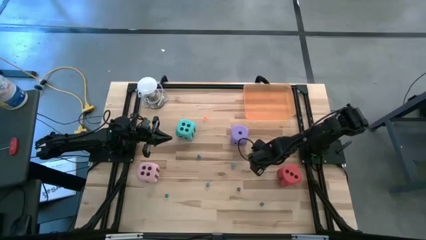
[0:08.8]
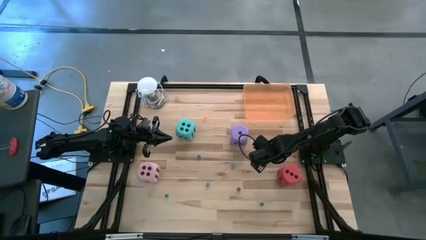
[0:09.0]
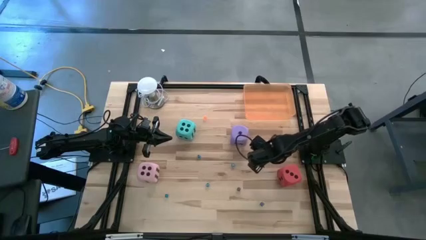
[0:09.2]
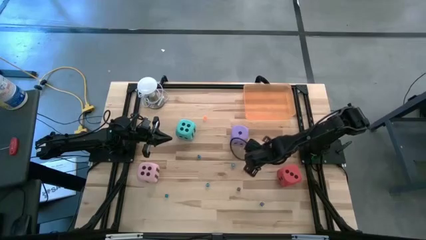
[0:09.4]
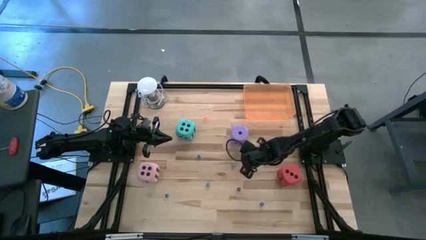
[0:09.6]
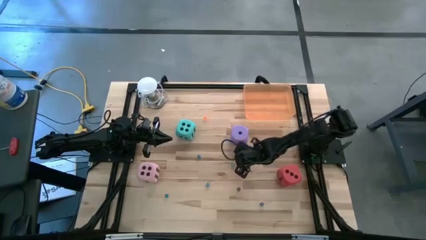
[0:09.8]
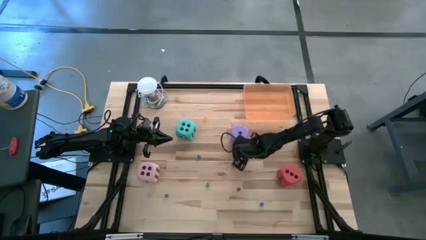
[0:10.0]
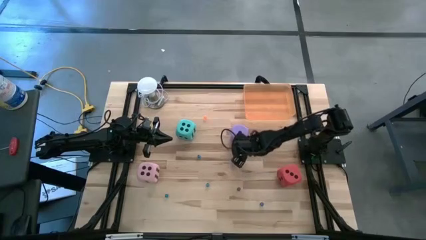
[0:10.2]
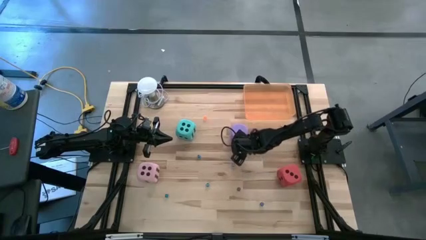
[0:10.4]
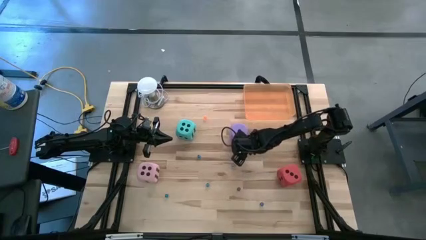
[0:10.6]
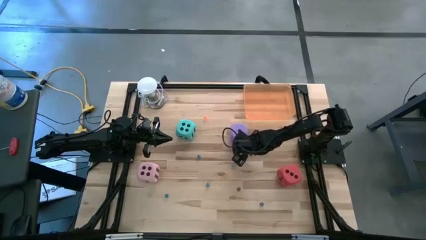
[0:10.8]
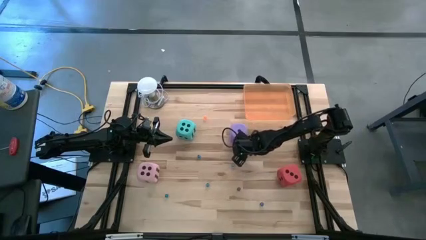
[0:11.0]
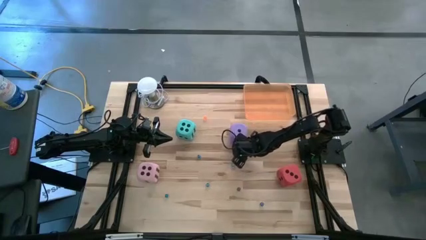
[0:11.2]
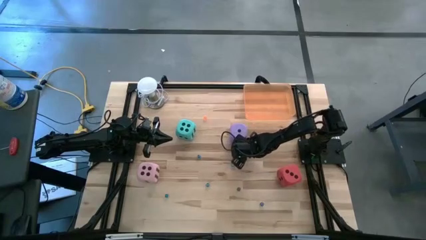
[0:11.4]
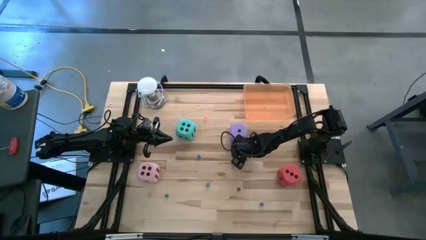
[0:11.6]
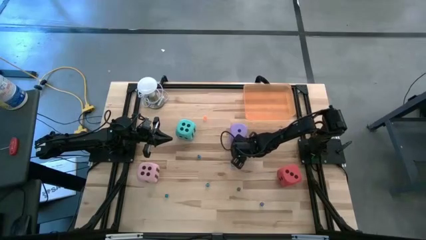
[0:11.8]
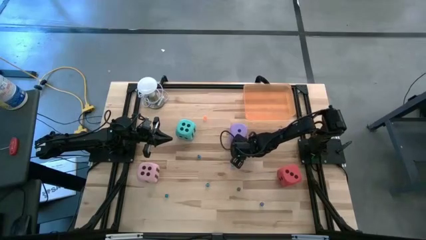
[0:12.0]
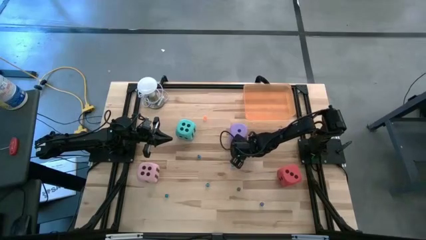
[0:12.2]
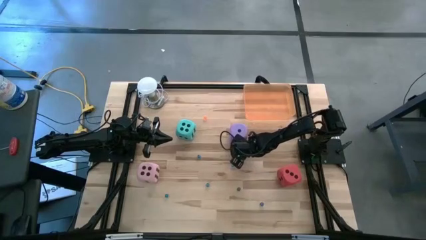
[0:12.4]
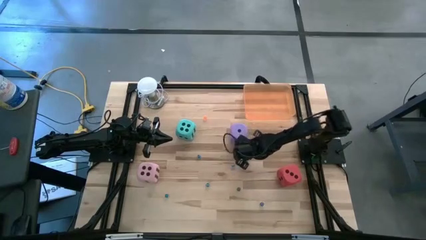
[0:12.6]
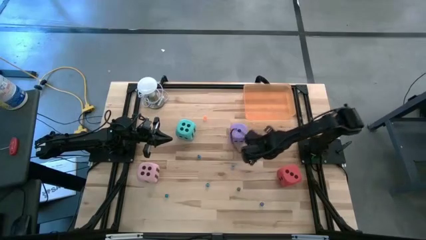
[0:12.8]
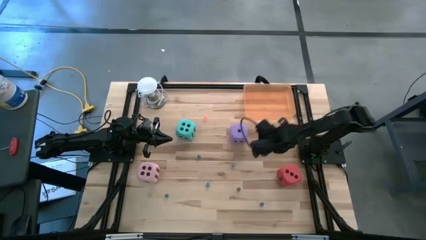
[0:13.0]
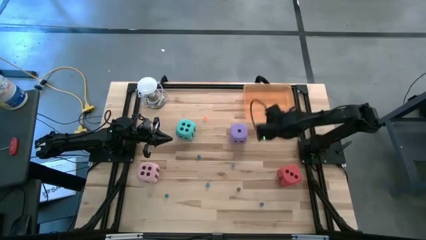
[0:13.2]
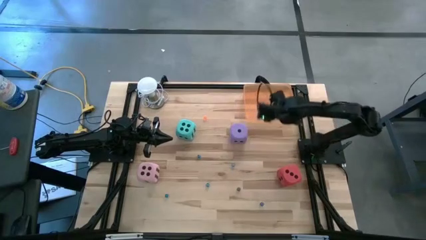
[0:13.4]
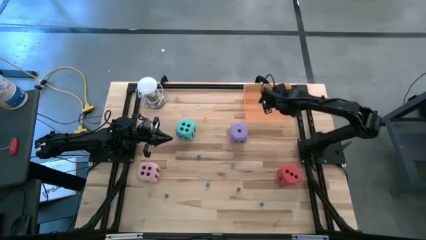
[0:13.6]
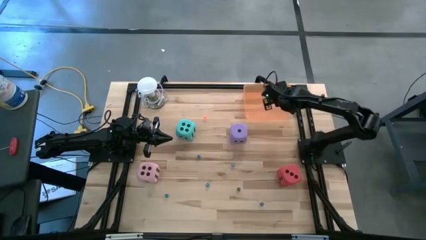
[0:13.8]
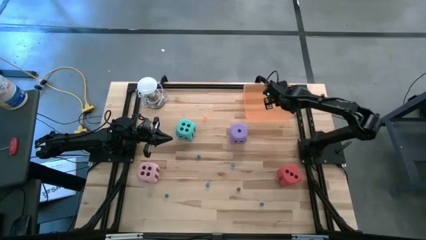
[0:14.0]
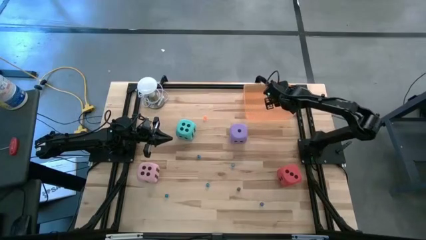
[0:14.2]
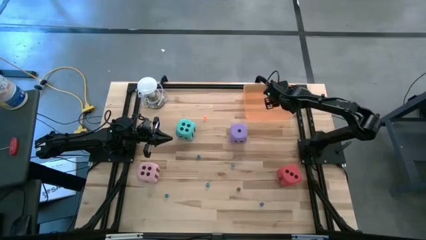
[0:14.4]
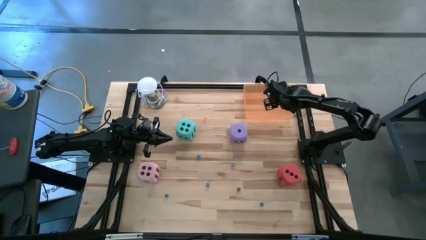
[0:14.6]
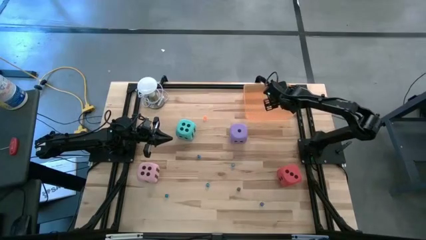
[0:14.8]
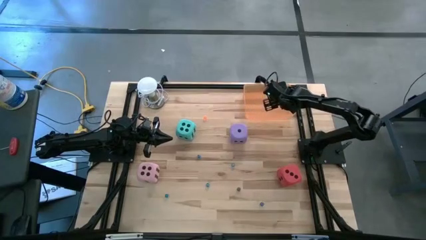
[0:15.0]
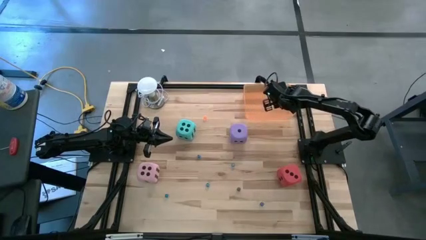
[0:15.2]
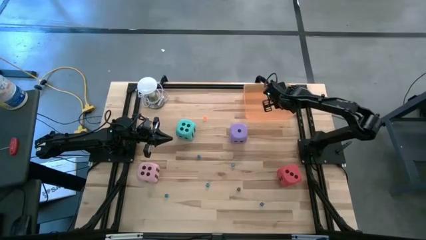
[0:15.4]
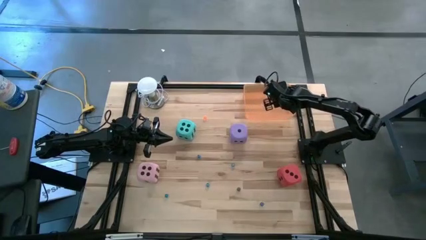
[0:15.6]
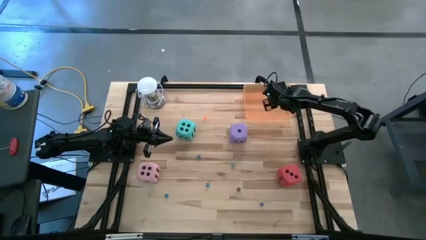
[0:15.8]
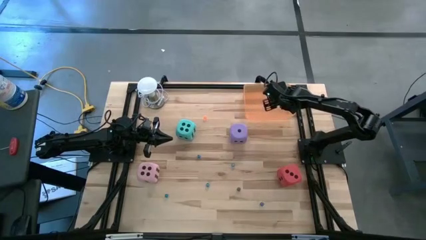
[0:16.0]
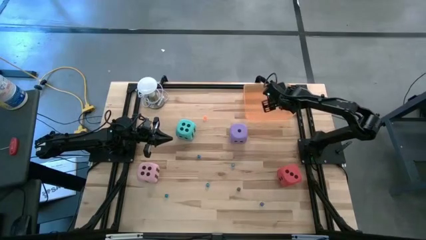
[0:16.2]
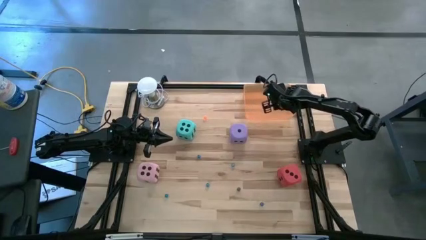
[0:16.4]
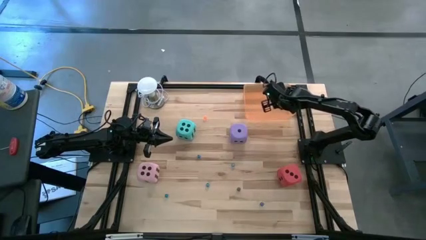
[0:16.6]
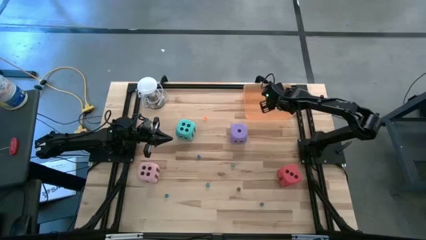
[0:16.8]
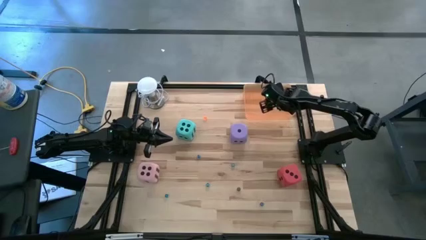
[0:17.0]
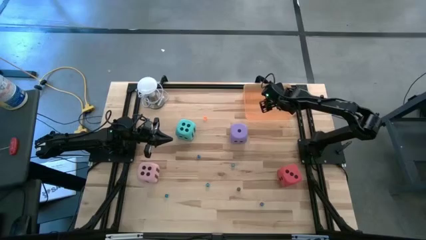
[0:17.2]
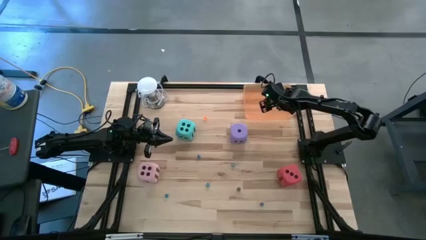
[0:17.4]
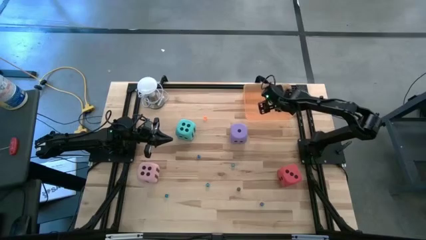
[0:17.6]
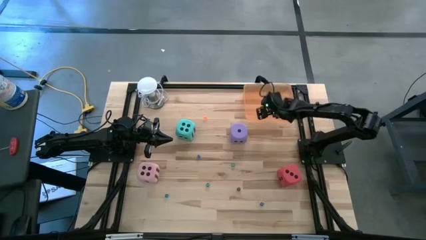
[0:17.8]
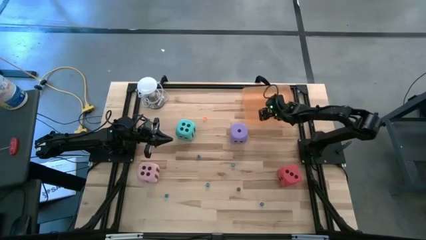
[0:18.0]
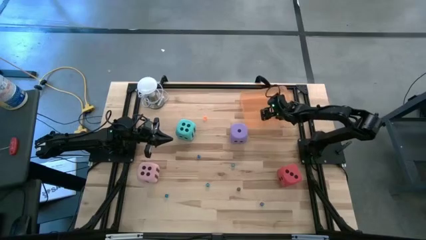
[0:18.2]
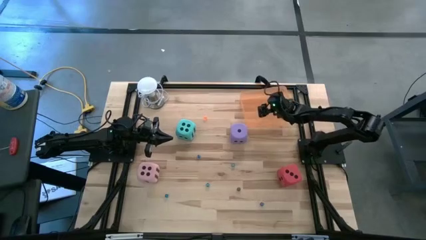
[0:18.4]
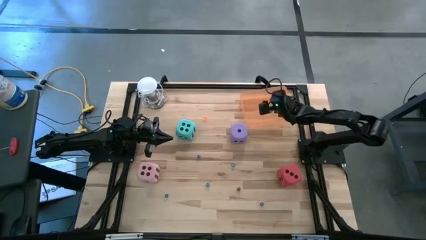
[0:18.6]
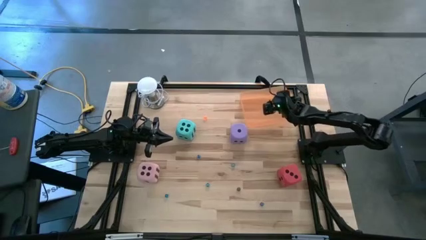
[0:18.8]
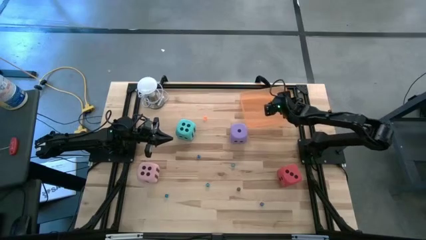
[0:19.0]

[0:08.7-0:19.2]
Task: Pick & Place Dice
Put the small light green die into the orange bin
